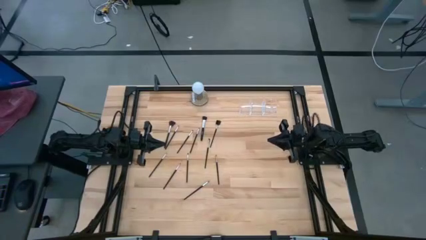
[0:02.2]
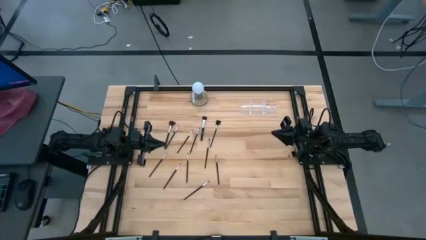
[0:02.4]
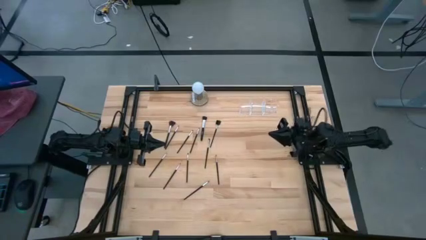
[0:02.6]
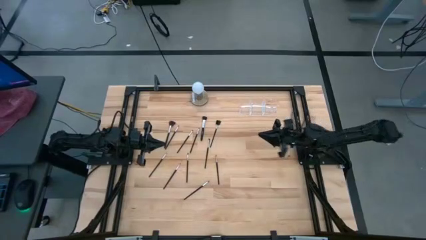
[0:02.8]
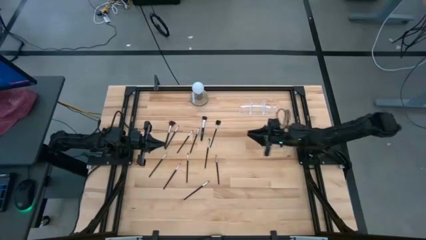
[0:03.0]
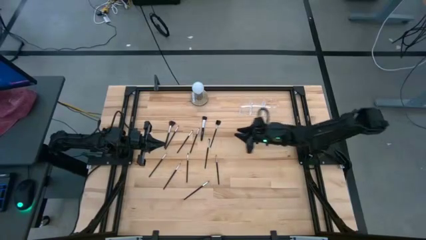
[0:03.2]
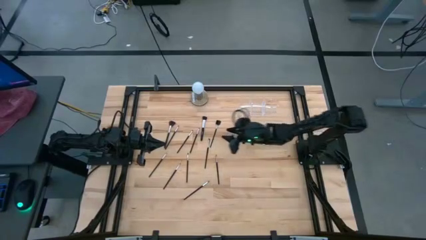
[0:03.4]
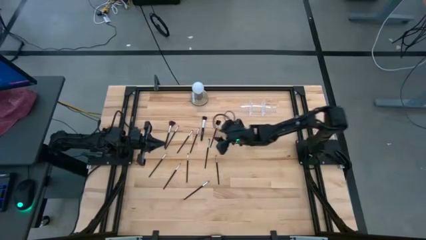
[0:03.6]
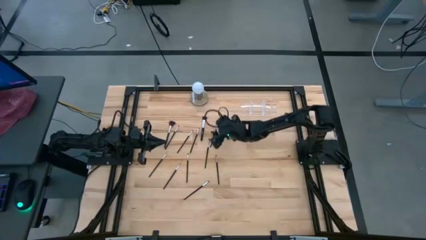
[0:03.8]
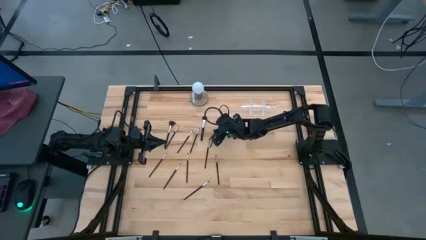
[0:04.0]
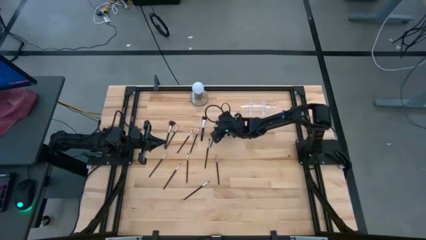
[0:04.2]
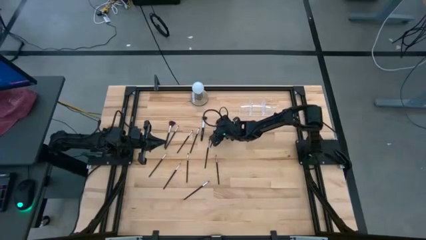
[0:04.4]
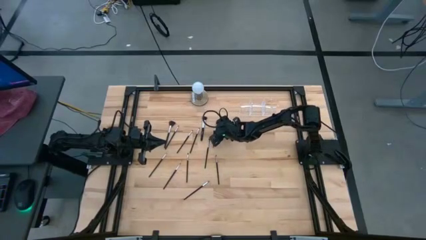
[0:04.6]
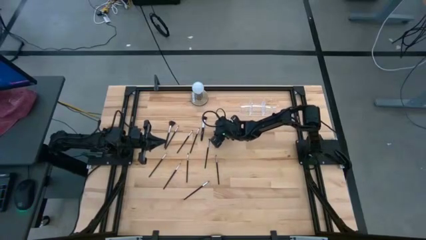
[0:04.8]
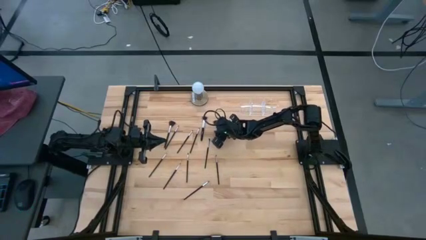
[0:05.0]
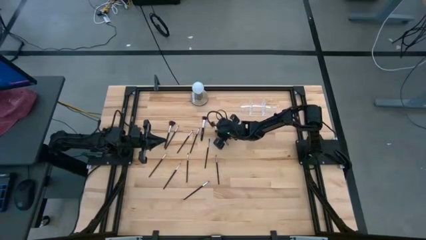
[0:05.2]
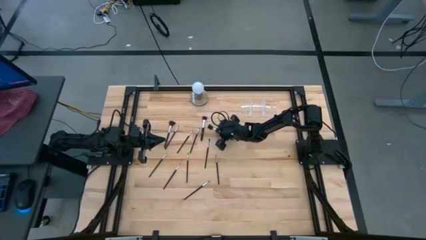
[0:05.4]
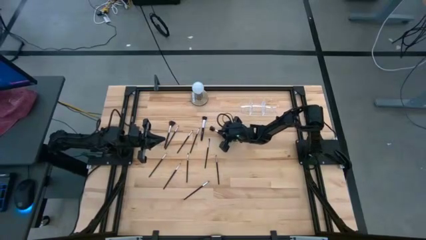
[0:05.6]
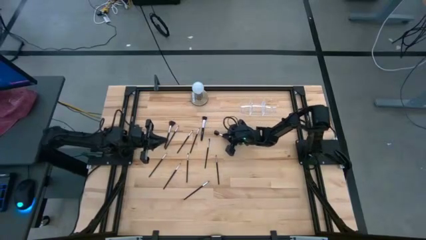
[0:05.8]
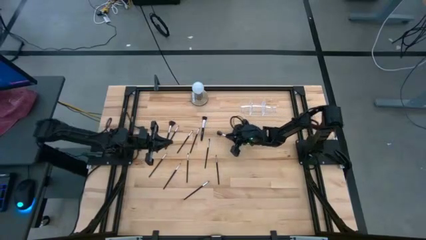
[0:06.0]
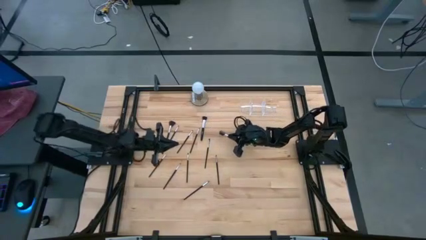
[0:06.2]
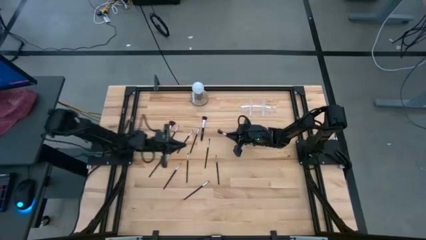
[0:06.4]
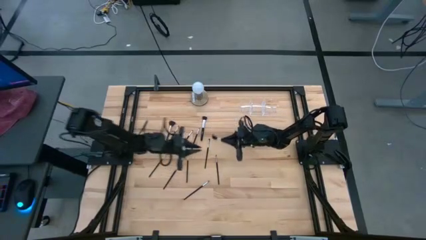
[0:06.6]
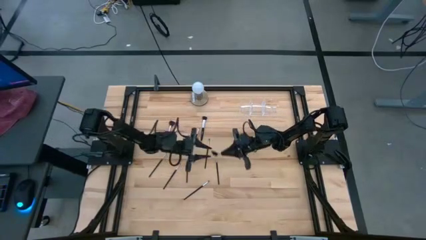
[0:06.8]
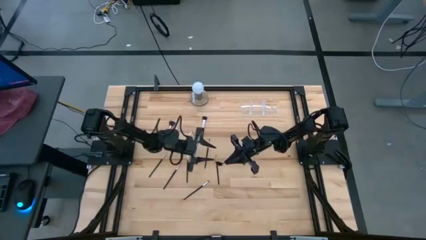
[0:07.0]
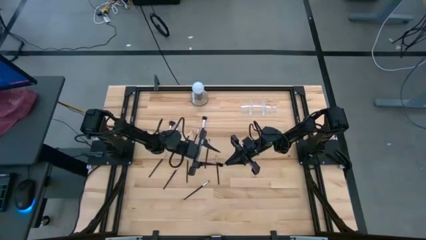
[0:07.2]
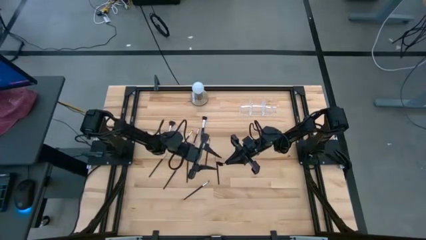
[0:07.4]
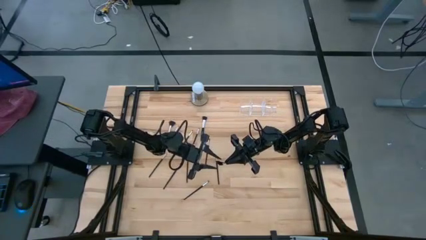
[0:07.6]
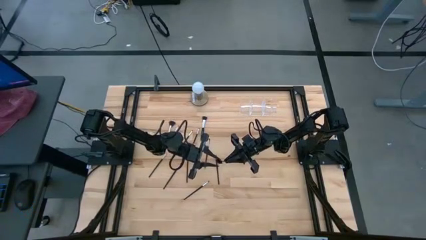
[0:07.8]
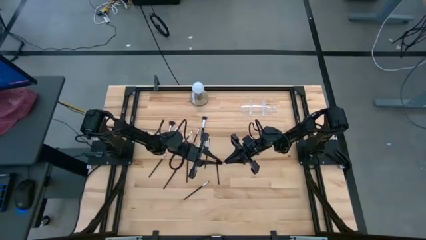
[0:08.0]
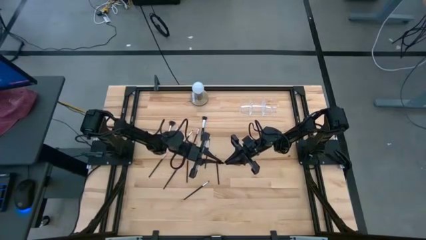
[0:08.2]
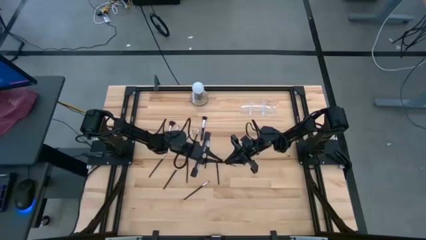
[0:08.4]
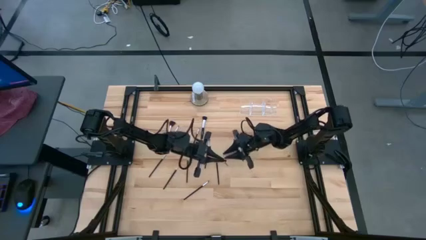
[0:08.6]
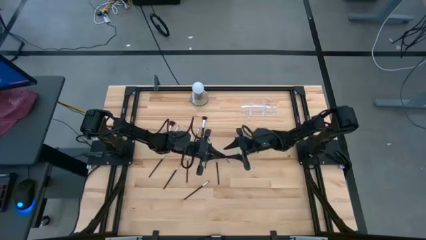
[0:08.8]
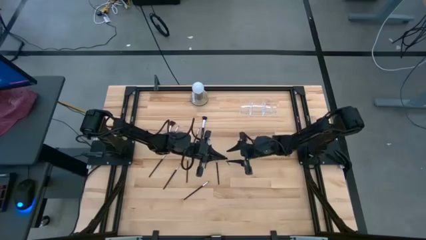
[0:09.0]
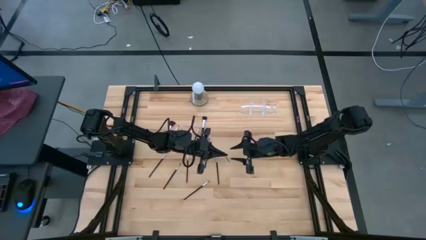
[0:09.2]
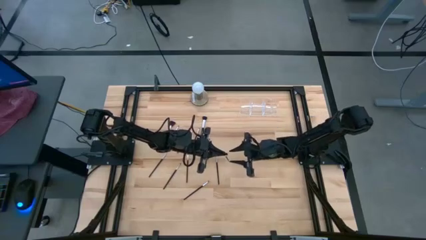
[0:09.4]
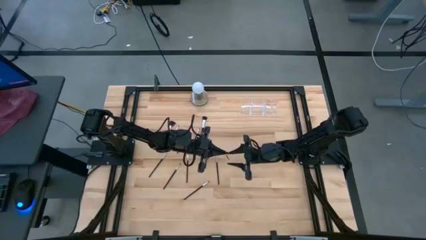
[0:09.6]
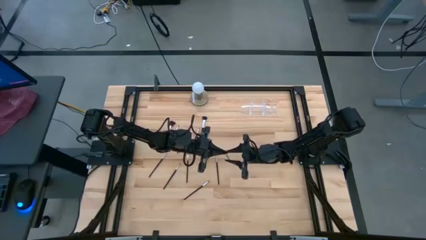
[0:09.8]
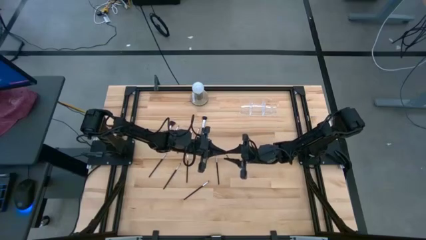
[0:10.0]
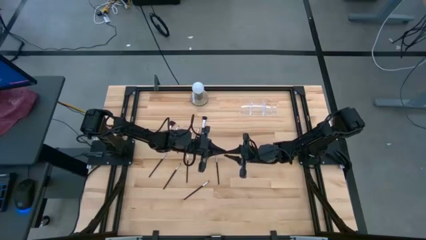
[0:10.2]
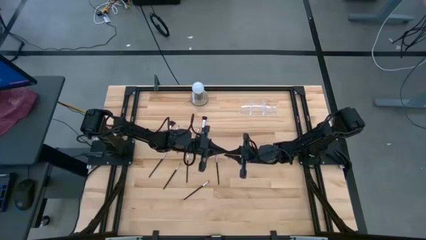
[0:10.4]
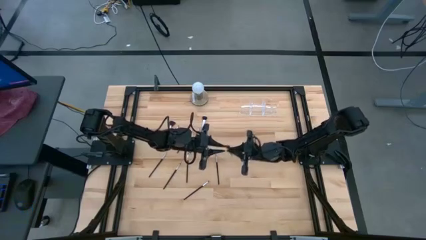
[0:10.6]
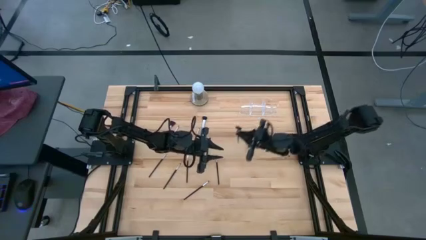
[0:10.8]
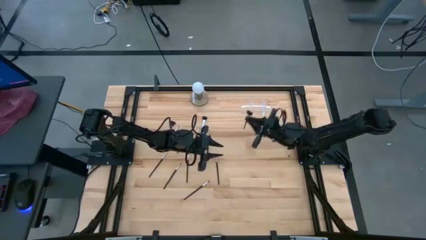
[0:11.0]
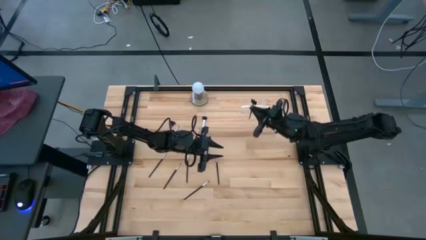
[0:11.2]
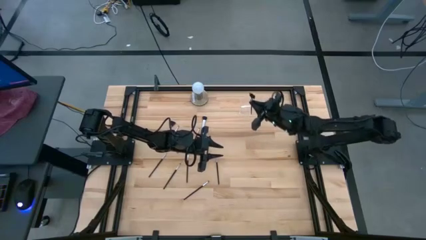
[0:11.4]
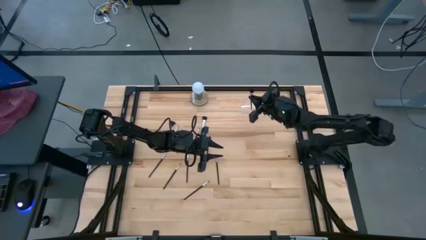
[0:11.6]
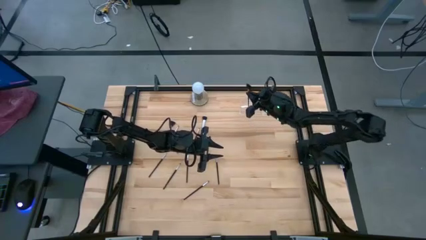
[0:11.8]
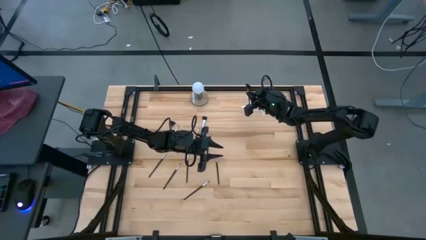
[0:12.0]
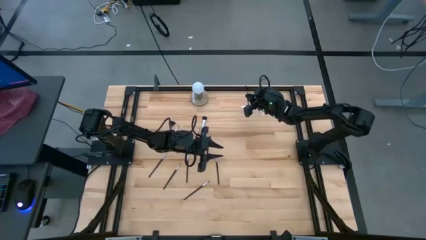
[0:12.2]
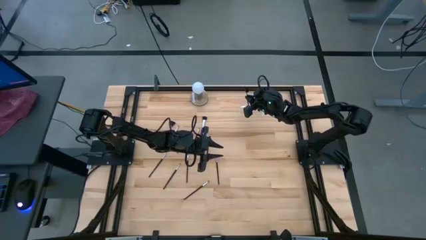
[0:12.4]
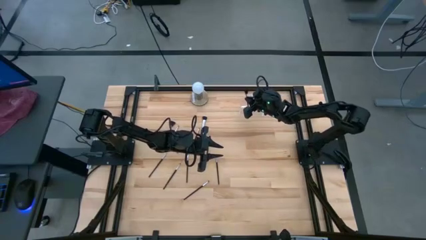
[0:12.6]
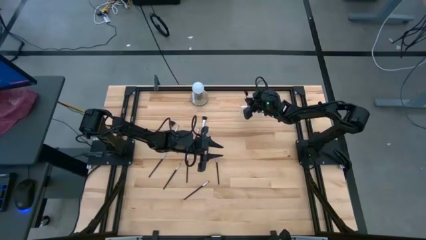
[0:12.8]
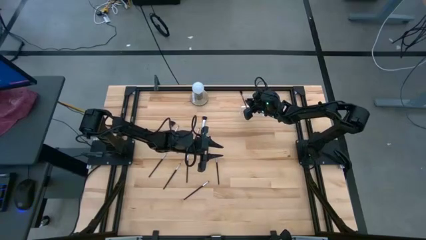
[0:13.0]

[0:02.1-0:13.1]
Task: Put items in baskets/containers
Put the silver brow brush into the transparent organizer

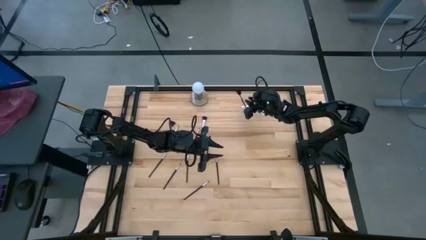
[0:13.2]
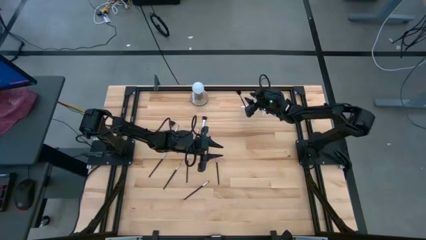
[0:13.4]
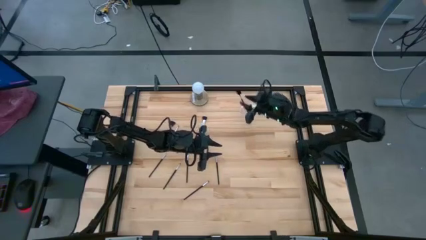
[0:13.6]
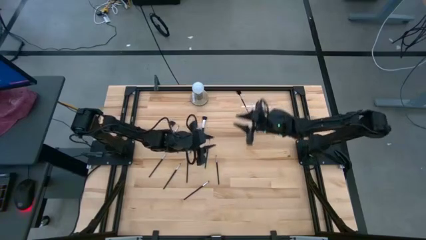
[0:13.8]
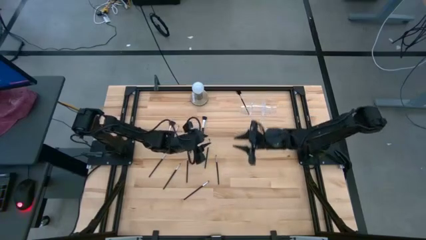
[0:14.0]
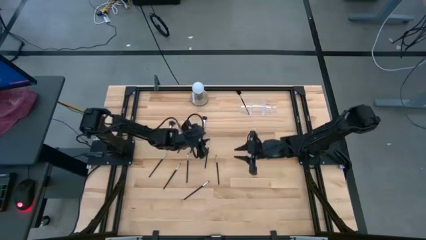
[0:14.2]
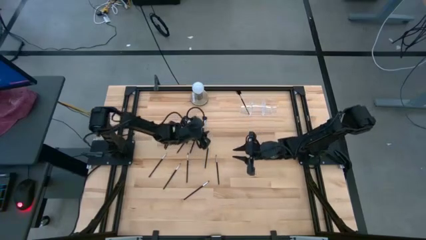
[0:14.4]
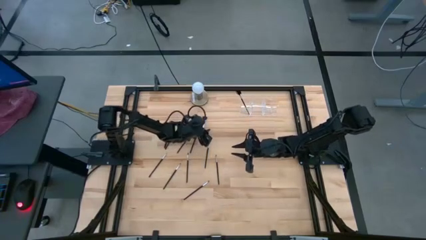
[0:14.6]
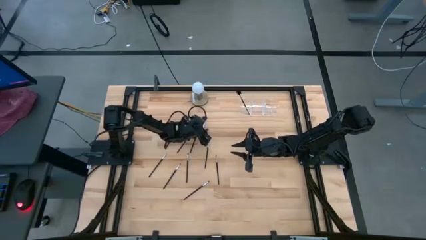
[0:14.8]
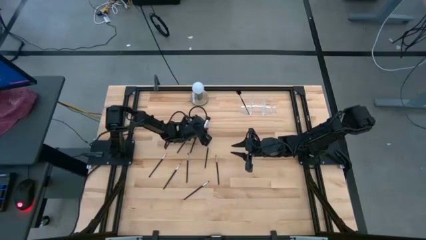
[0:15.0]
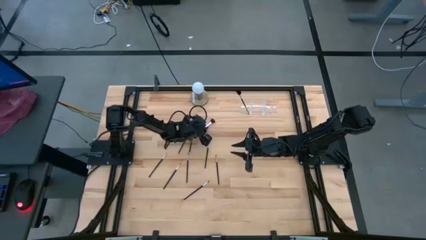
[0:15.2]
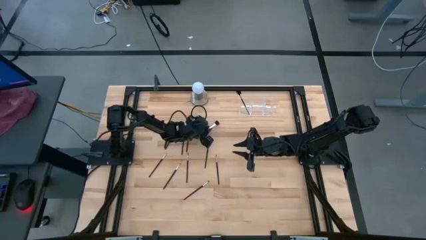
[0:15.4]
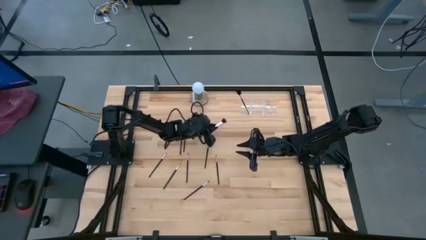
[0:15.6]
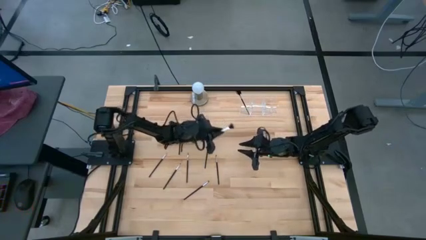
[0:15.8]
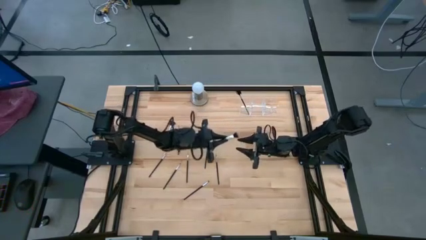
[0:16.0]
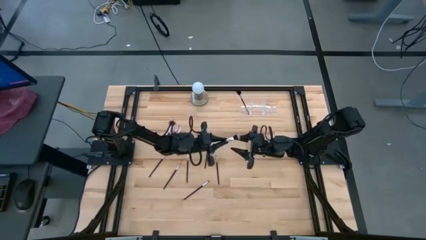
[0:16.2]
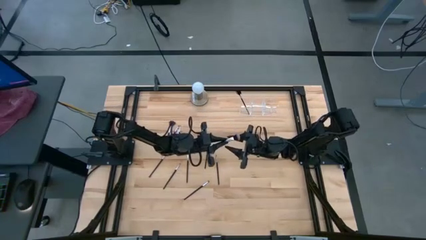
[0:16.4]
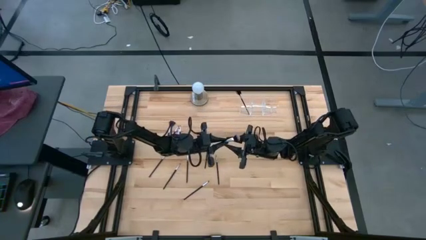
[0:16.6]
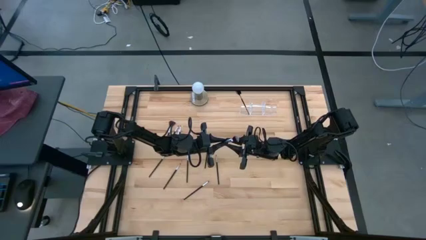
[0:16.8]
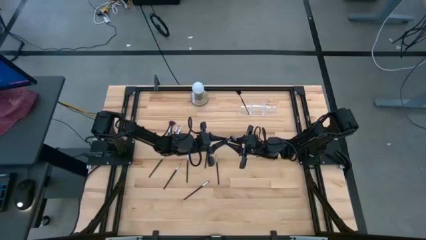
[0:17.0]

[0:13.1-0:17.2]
Put the silver powder brush into the transparent organizer
